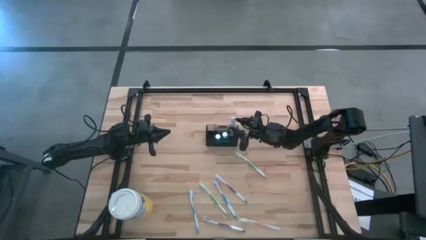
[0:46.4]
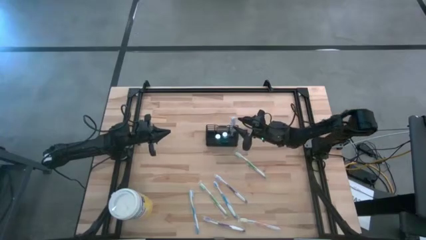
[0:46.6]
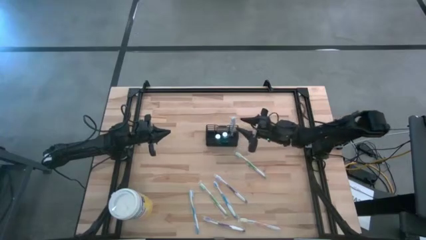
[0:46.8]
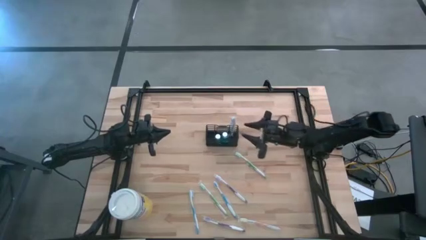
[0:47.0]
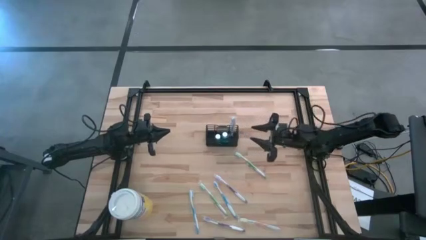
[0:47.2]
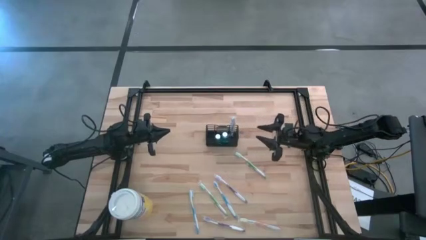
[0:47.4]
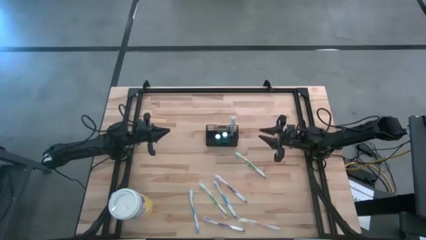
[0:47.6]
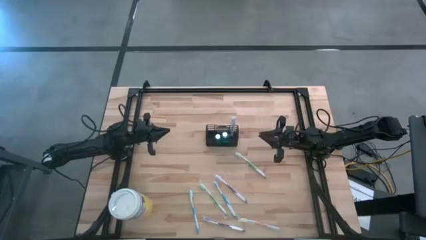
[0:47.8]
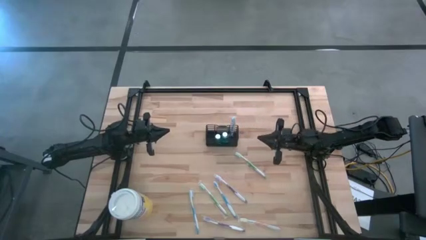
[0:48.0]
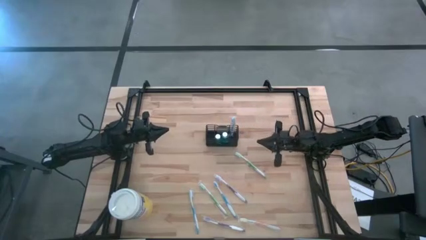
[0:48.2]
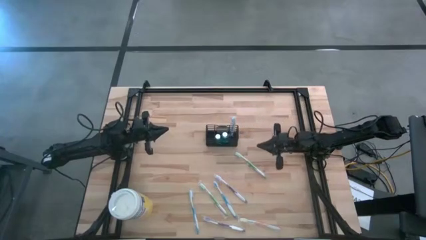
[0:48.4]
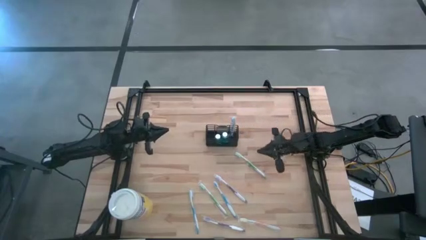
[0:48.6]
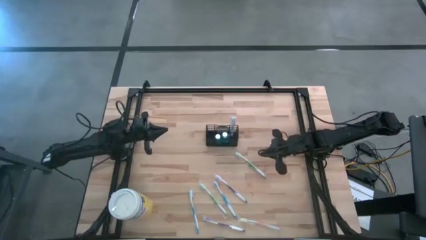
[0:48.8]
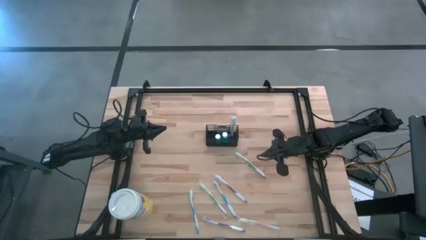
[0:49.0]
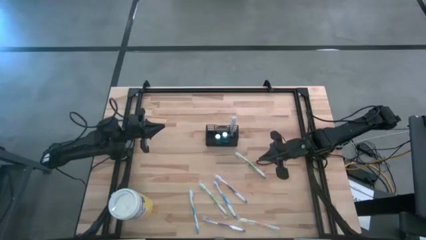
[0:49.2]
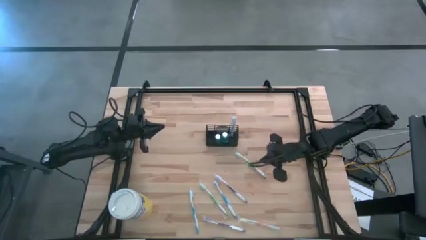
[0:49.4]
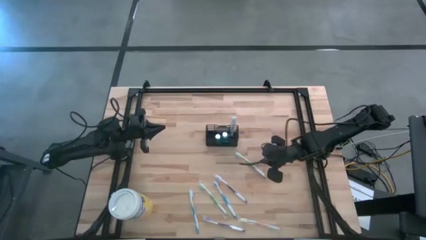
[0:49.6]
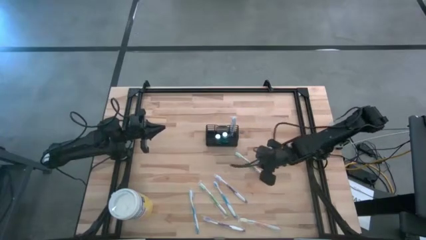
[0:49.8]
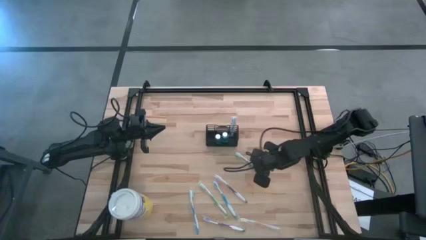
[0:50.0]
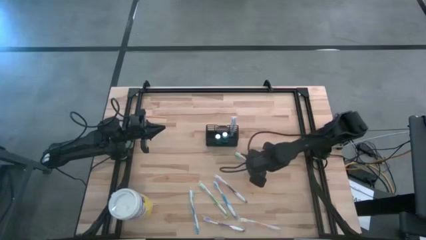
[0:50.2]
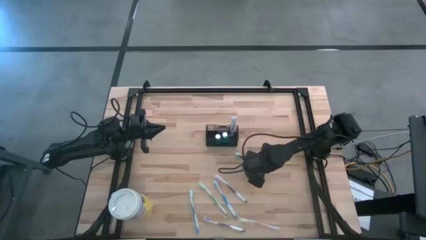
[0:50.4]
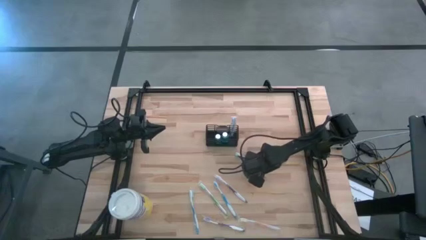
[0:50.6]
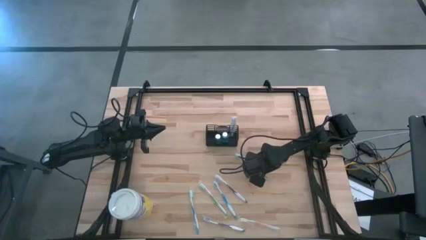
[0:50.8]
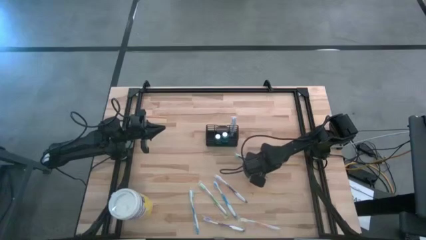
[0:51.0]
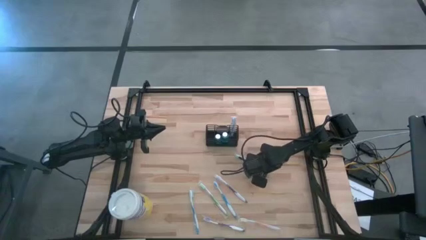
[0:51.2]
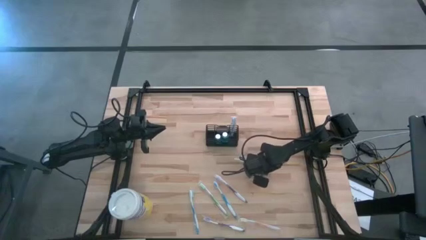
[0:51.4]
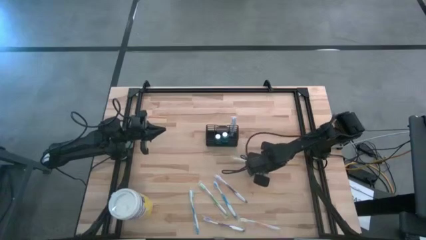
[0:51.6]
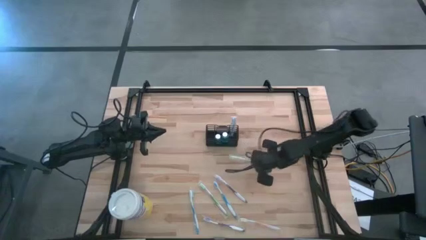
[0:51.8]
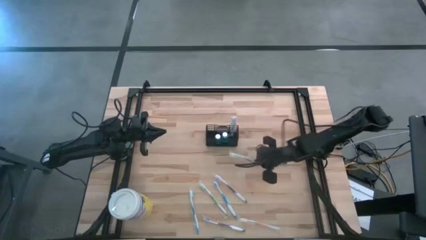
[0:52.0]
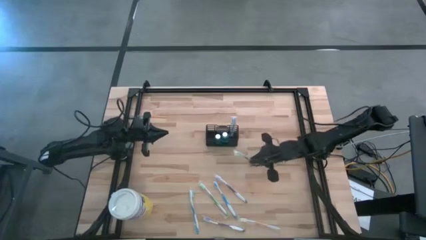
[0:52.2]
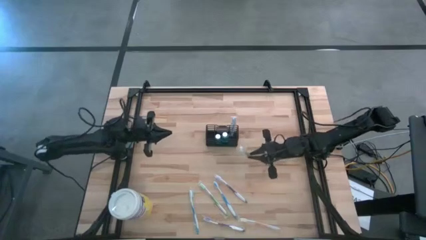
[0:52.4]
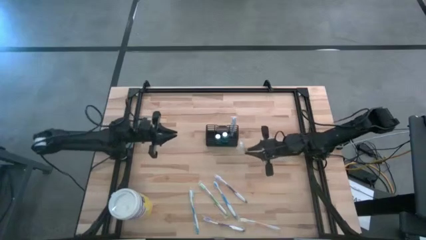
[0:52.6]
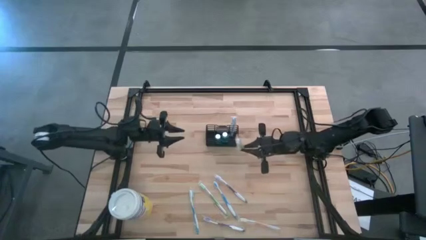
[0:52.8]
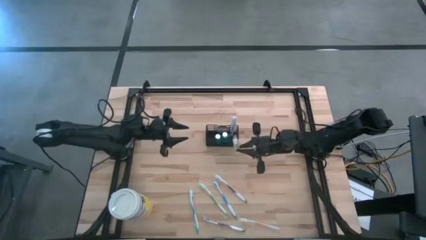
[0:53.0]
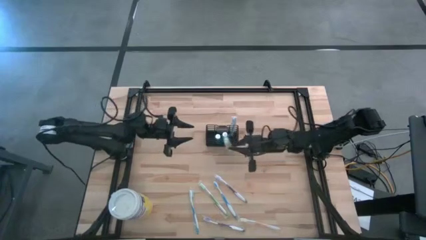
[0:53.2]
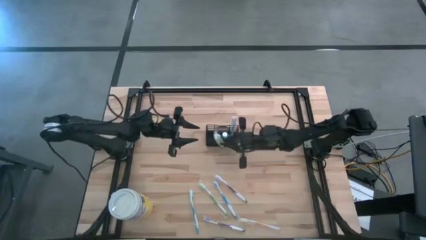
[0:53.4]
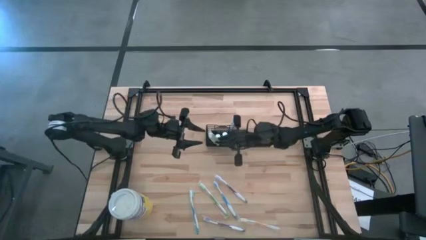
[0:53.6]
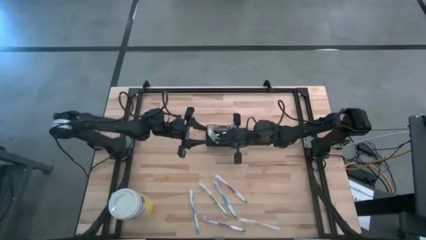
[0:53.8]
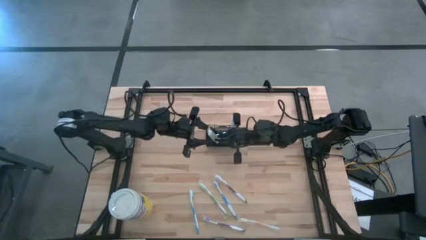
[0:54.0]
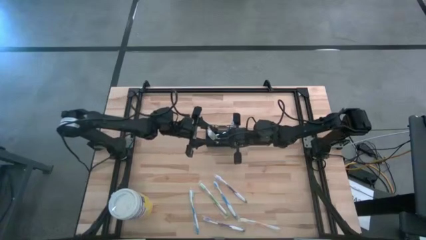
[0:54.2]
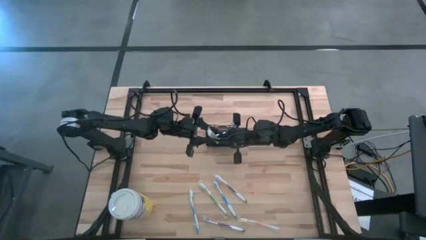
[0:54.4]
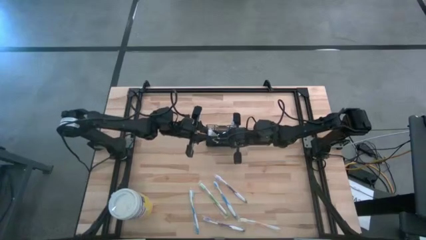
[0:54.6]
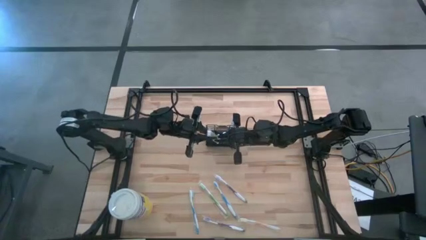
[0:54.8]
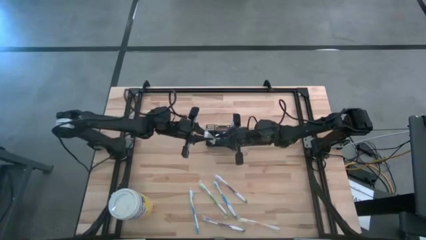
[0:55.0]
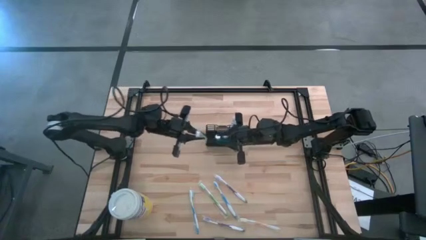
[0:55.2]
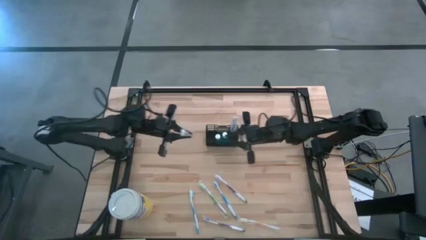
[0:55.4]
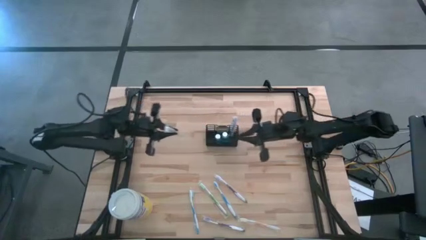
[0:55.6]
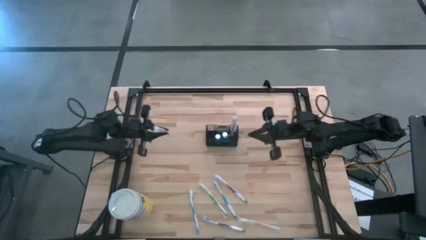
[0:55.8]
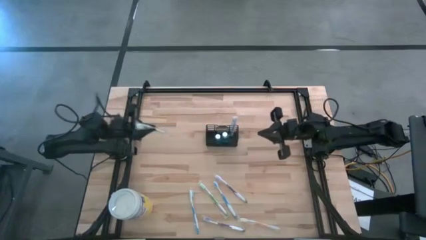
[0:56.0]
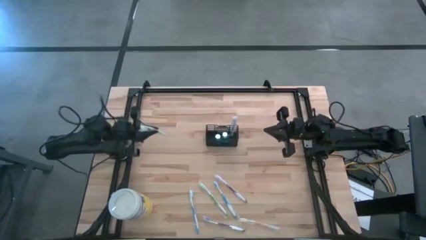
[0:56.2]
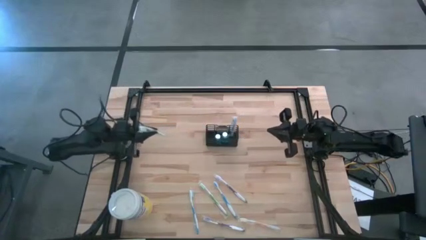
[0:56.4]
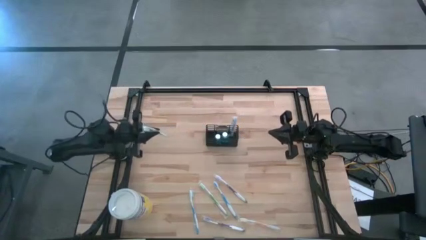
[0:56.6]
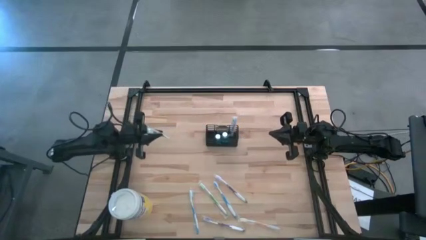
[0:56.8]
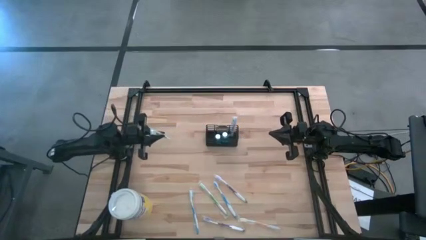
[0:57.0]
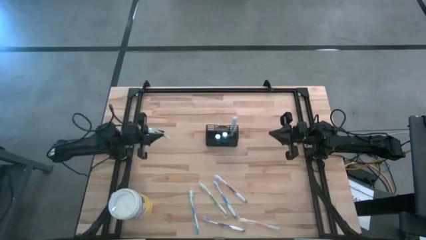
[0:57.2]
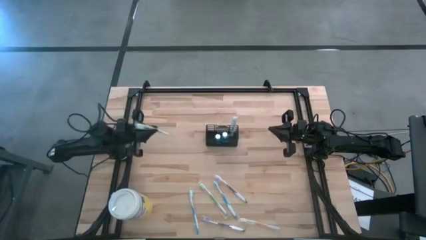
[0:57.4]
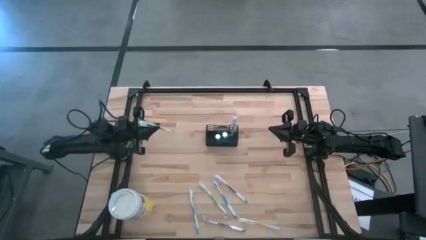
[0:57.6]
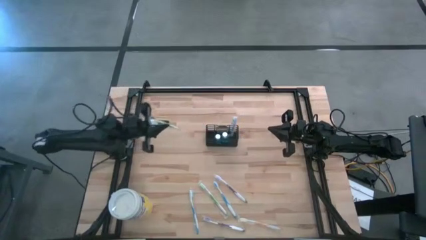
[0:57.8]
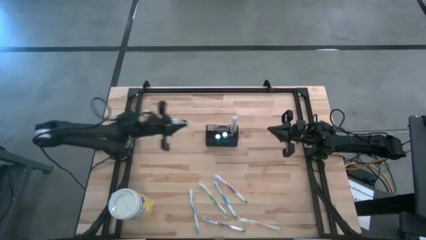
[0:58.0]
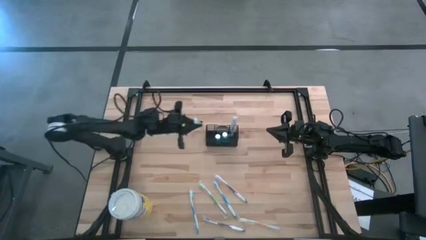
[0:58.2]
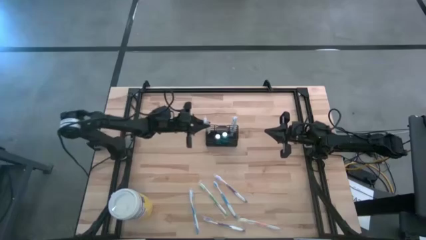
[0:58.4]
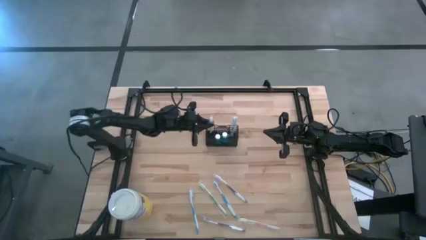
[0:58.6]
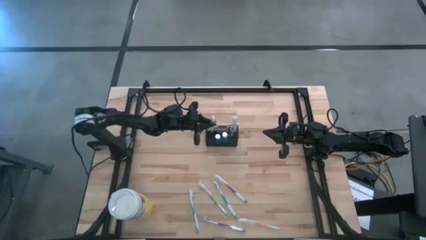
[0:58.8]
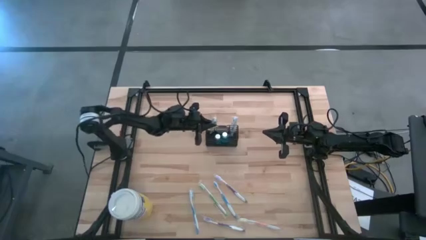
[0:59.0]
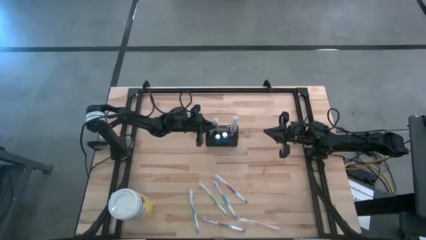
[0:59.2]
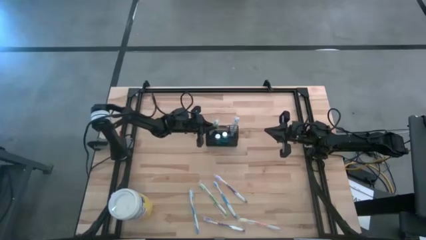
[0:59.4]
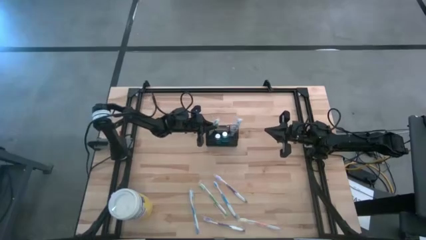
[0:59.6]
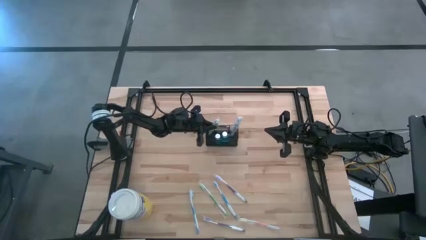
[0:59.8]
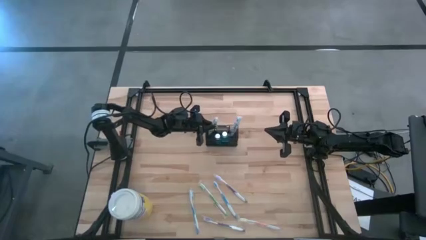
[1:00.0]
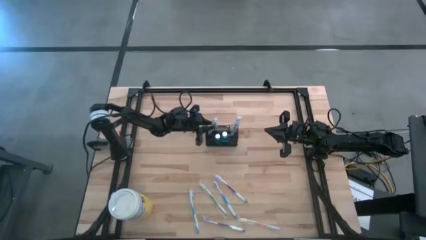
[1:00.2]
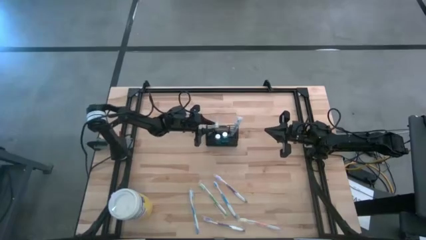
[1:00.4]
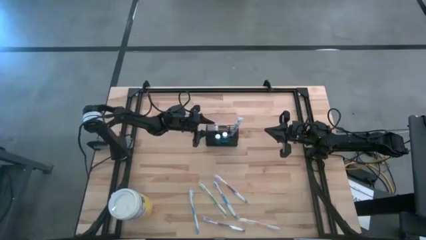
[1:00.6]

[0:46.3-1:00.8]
Task: Pick & Place toothbrushing station
Put the top green toothbrush into the wire organizer

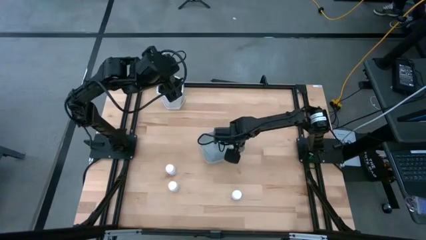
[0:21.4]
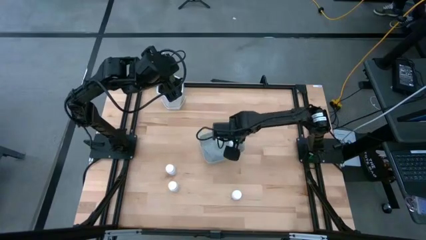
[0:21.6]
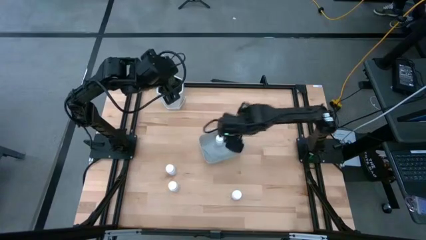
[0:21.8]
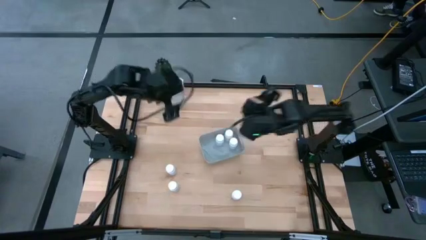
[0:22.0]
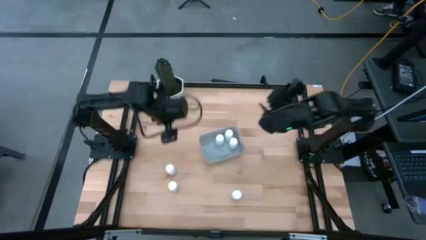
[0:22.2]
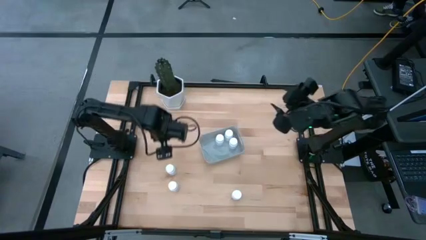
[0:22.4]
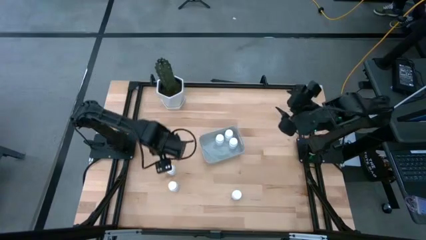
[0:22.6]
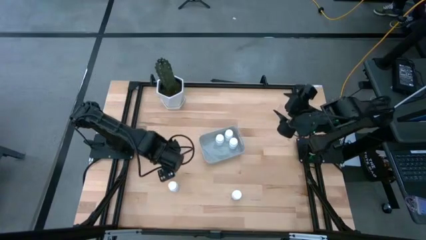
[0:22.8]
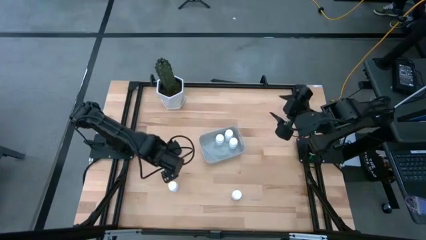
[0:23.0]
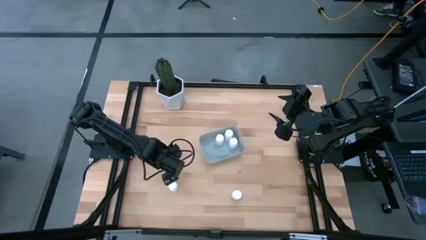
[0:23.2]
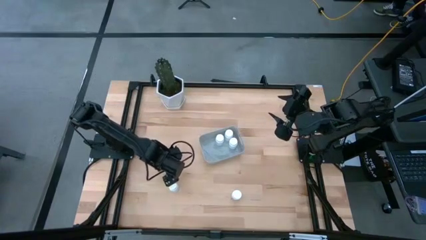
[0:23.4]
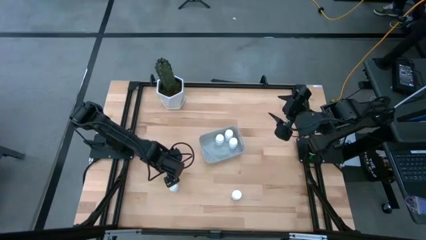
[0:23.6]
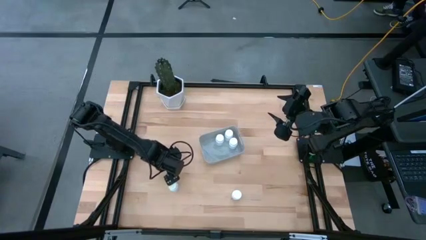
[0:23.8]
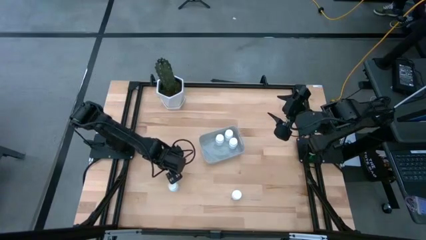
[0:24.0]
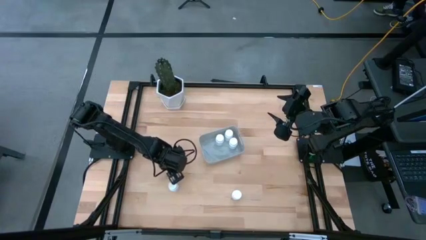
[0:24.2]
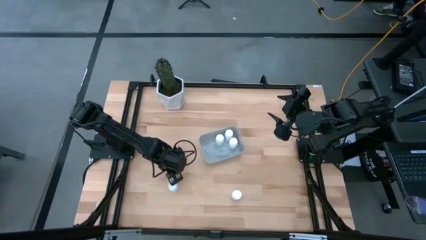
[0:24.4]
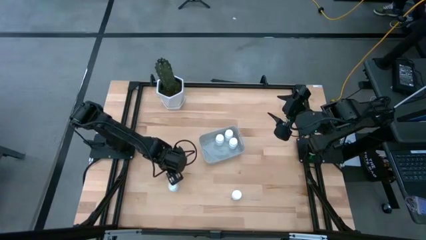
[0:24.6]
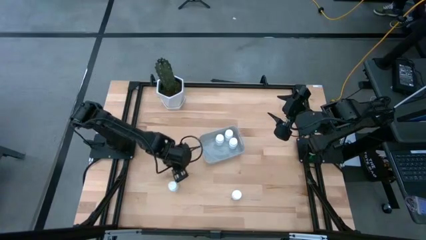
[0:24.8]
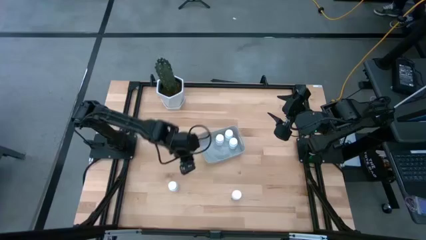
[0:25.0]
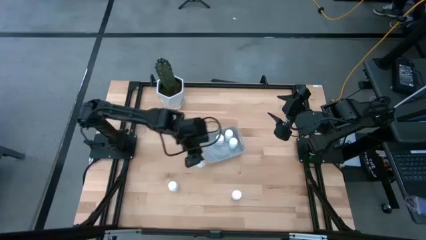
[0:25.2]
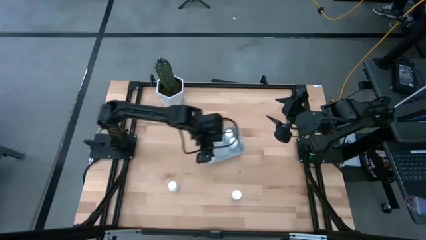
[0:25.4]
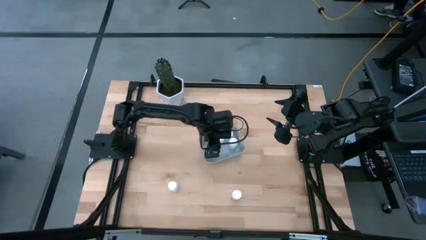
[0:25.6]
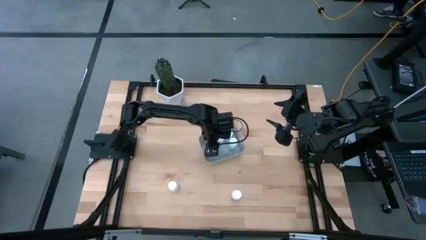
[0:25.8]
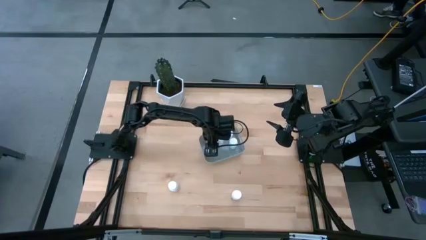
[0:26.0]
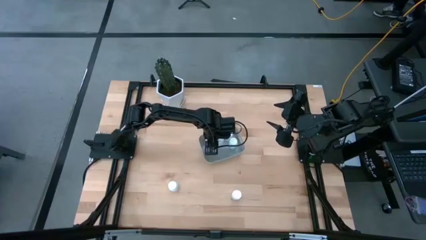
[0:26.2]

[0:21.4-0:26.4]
Task: Pick and place pill bottles into a basket
Put the white pill bottle into the gray bin
